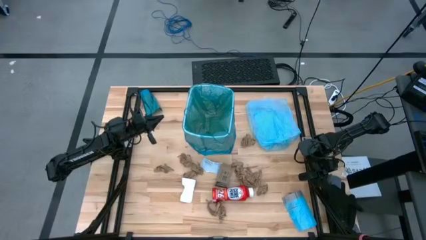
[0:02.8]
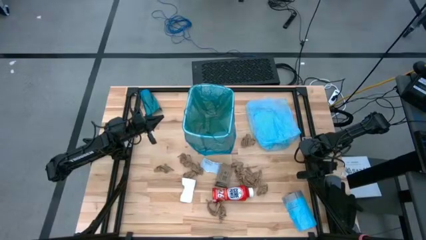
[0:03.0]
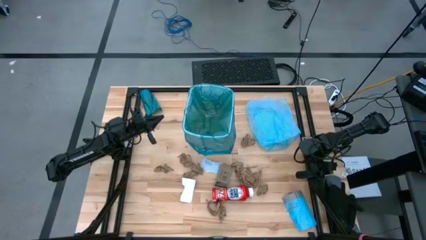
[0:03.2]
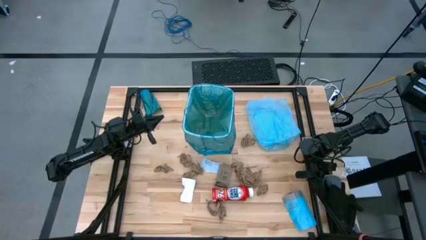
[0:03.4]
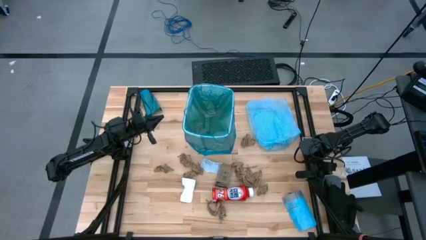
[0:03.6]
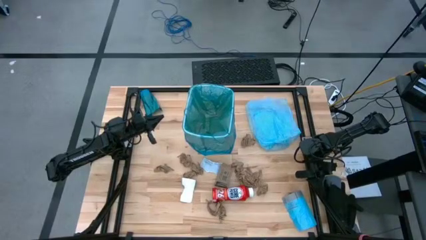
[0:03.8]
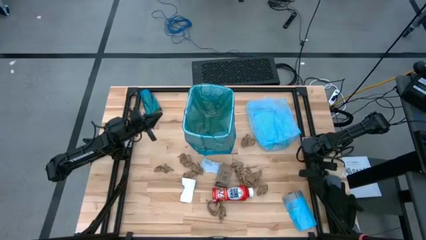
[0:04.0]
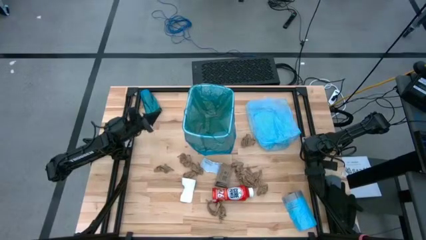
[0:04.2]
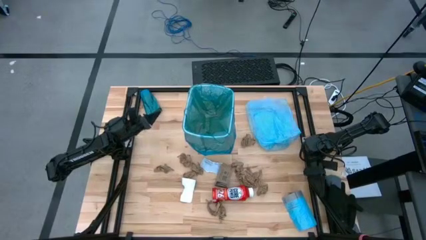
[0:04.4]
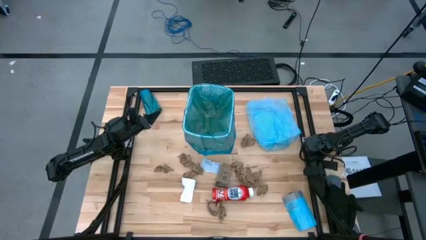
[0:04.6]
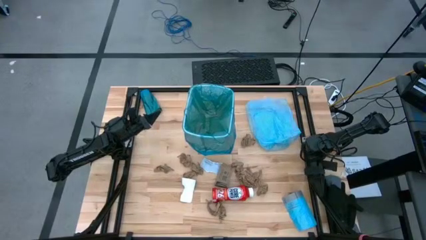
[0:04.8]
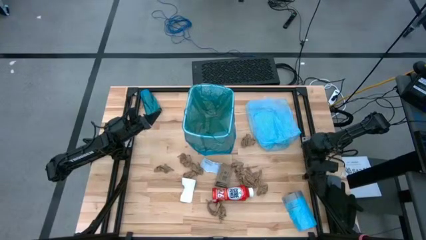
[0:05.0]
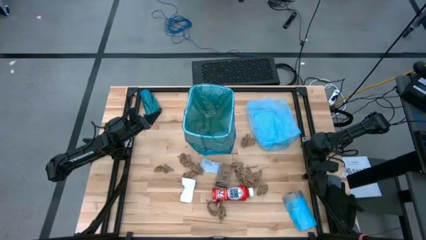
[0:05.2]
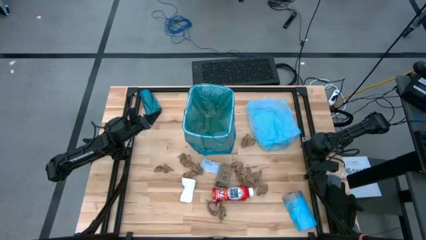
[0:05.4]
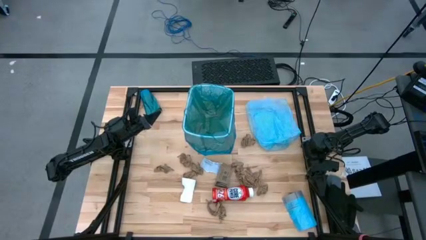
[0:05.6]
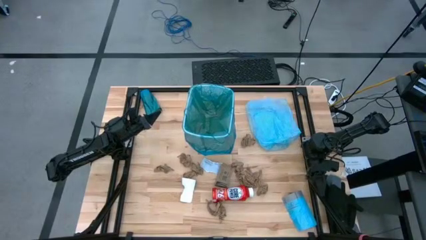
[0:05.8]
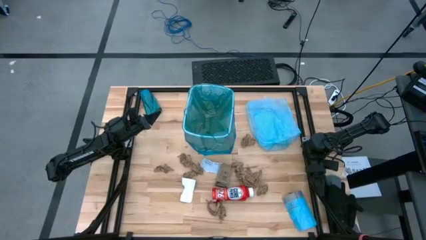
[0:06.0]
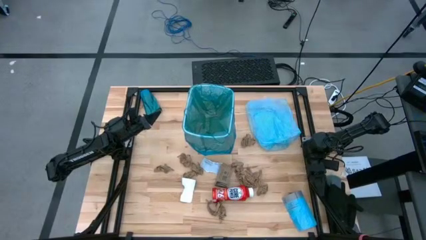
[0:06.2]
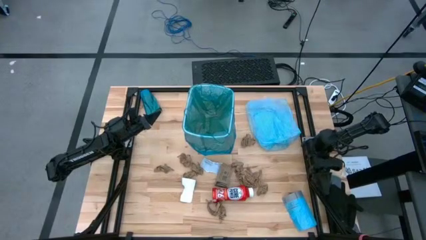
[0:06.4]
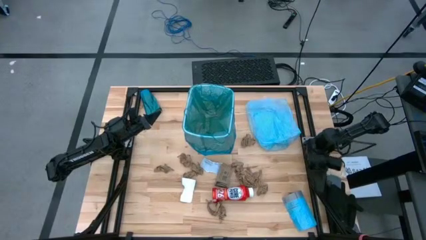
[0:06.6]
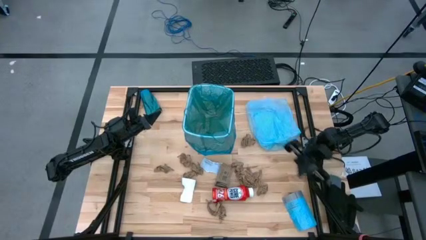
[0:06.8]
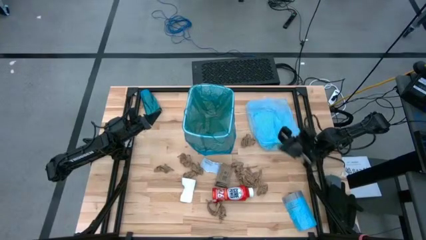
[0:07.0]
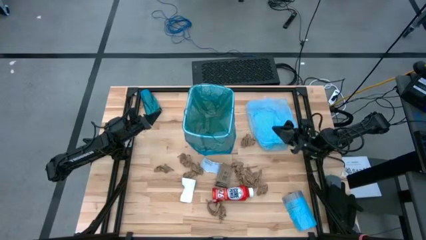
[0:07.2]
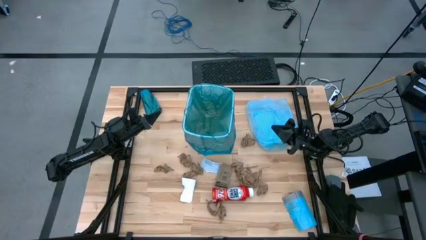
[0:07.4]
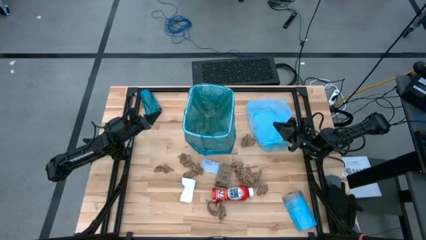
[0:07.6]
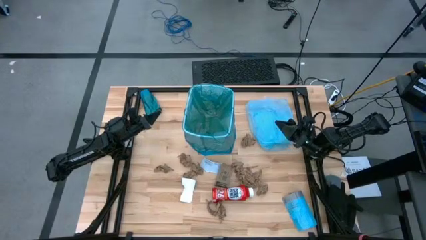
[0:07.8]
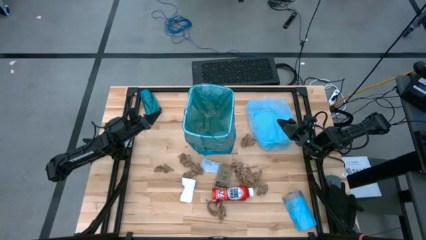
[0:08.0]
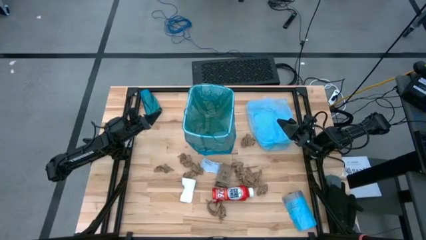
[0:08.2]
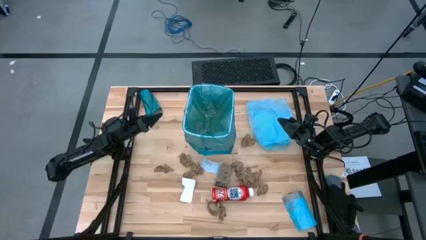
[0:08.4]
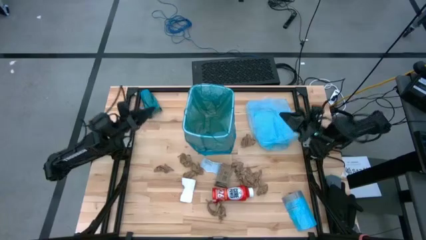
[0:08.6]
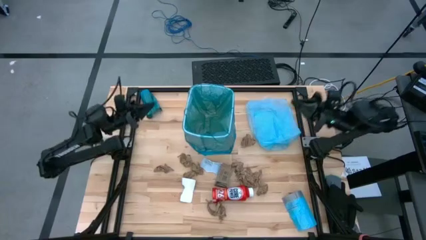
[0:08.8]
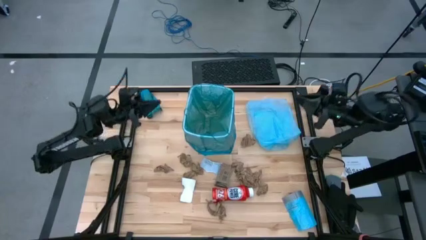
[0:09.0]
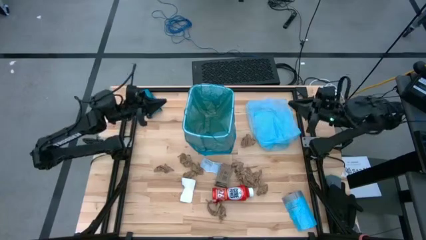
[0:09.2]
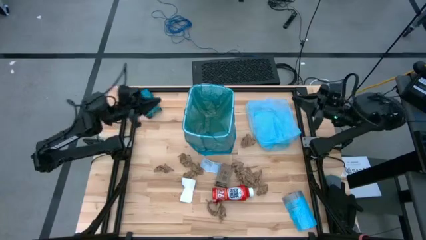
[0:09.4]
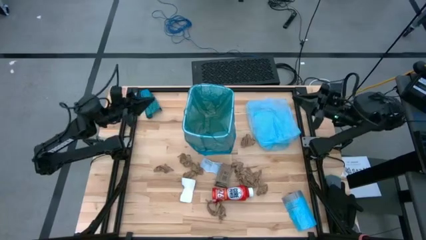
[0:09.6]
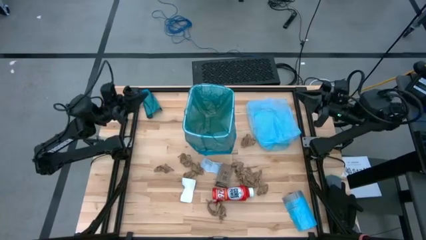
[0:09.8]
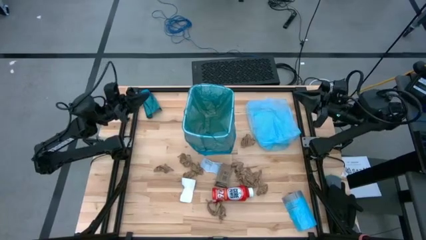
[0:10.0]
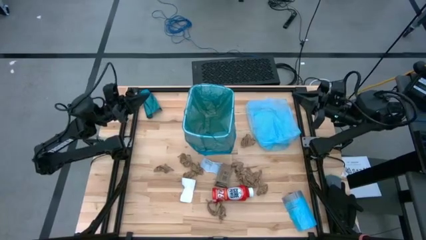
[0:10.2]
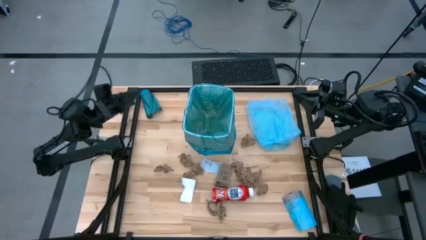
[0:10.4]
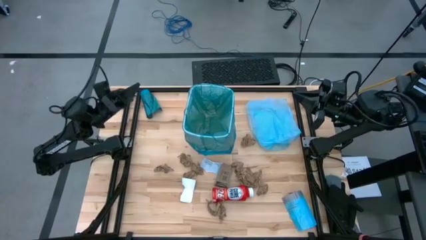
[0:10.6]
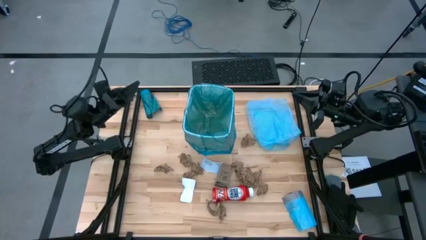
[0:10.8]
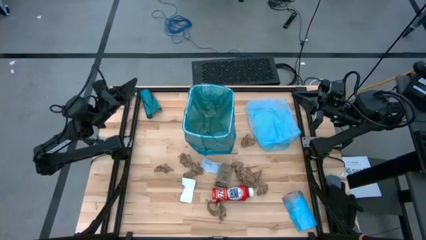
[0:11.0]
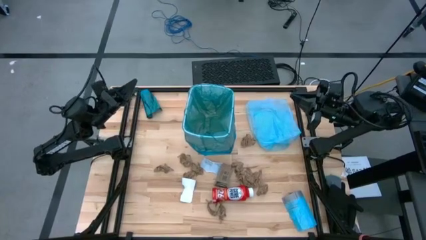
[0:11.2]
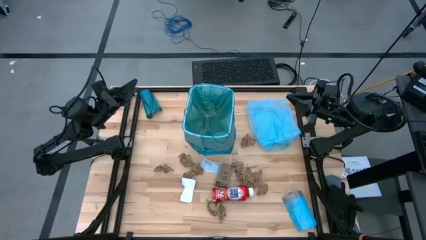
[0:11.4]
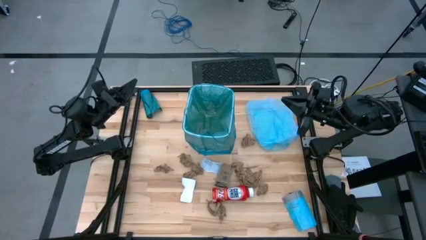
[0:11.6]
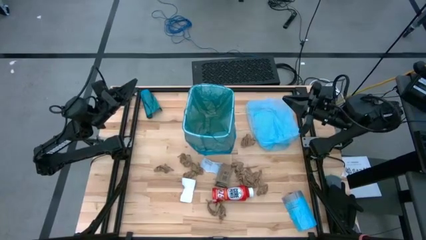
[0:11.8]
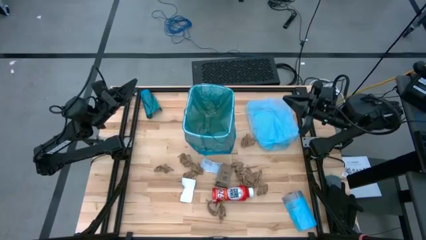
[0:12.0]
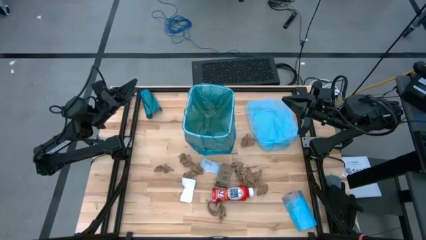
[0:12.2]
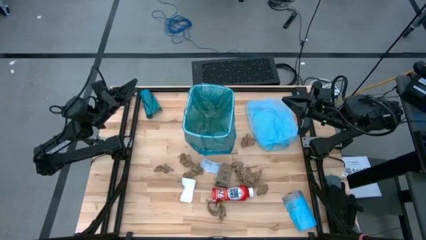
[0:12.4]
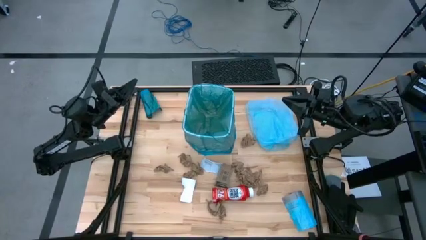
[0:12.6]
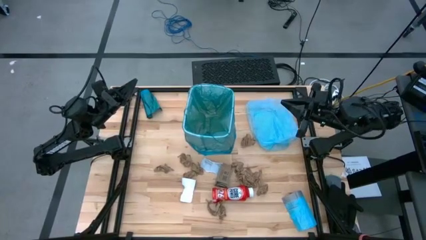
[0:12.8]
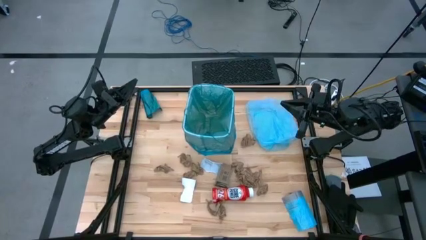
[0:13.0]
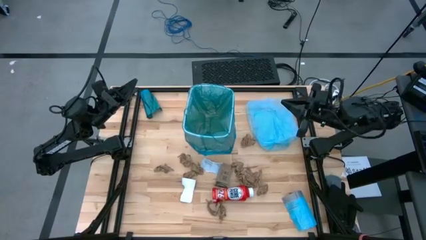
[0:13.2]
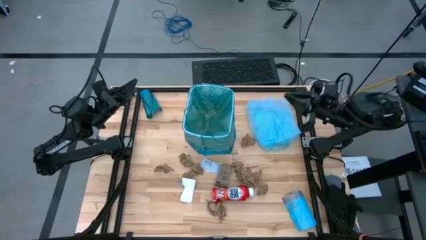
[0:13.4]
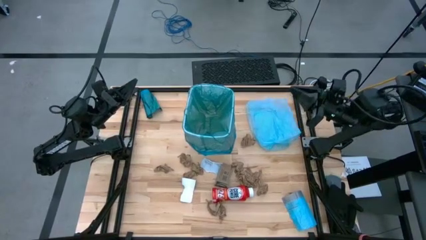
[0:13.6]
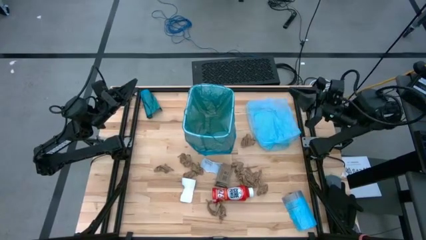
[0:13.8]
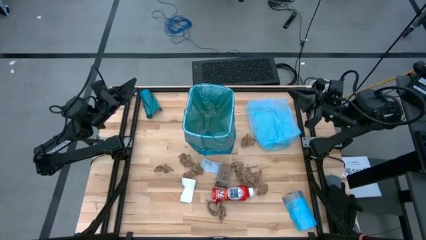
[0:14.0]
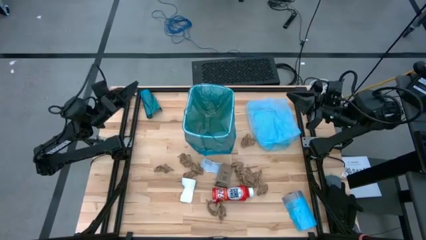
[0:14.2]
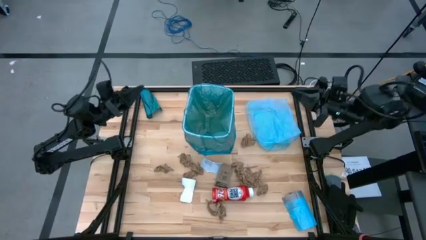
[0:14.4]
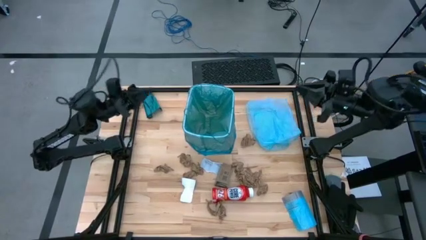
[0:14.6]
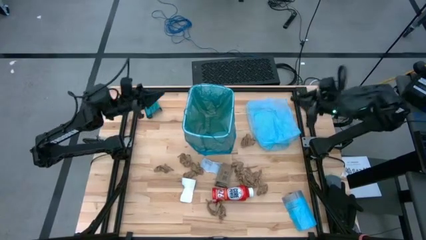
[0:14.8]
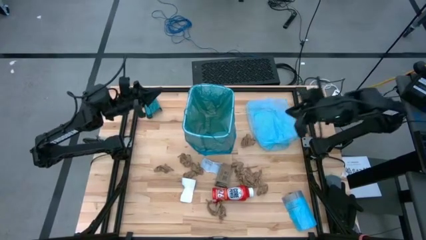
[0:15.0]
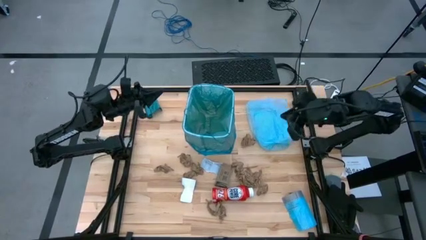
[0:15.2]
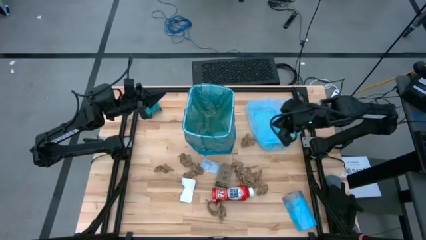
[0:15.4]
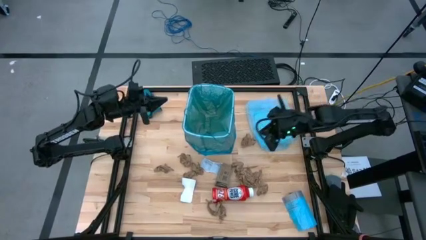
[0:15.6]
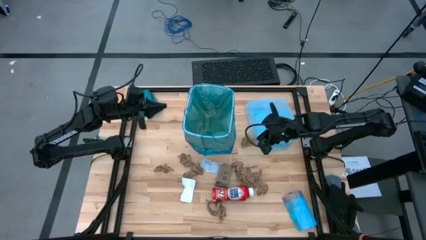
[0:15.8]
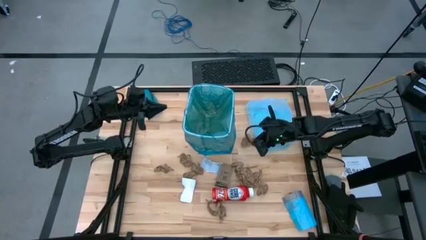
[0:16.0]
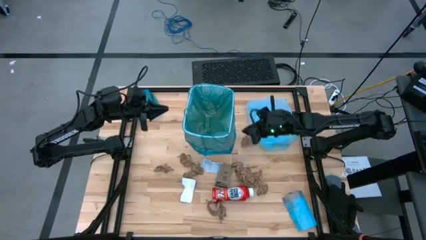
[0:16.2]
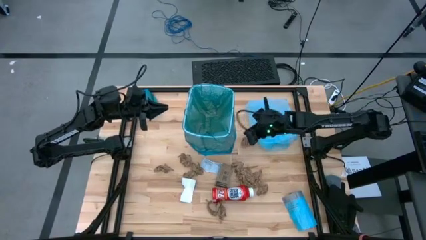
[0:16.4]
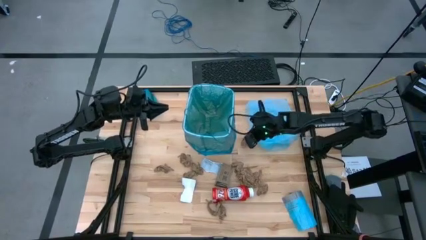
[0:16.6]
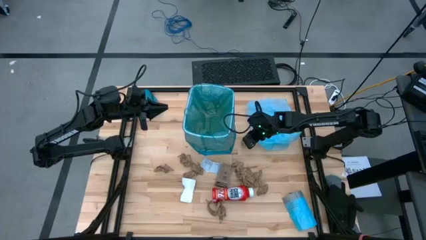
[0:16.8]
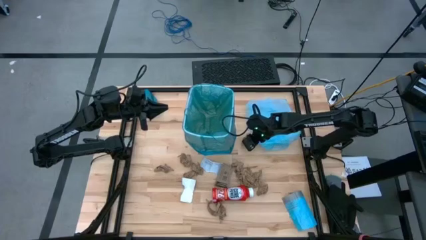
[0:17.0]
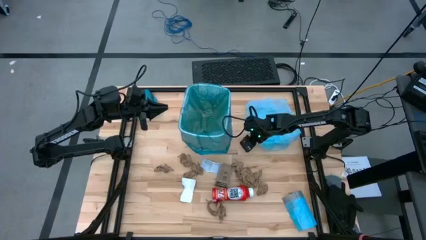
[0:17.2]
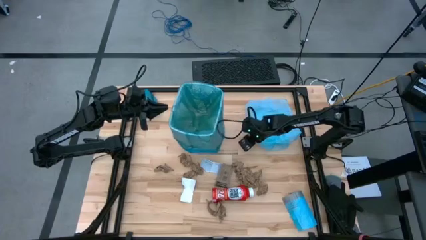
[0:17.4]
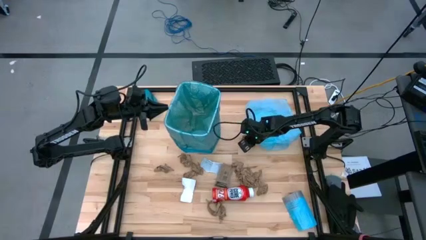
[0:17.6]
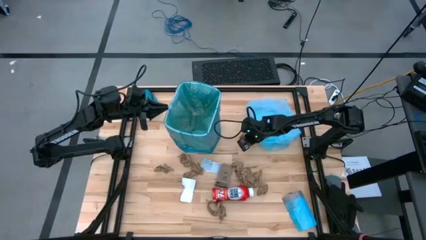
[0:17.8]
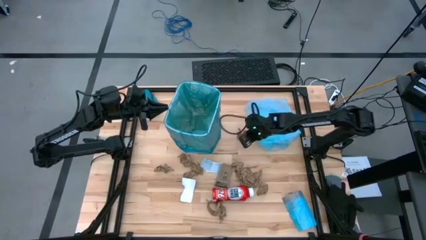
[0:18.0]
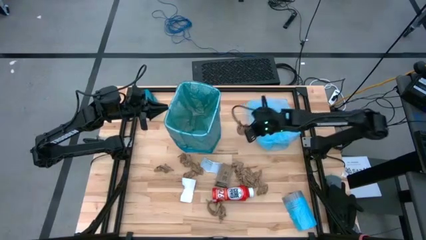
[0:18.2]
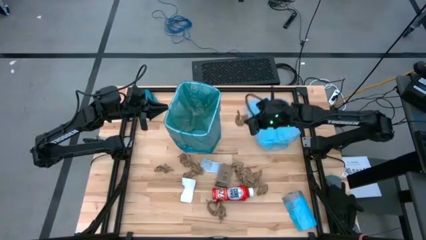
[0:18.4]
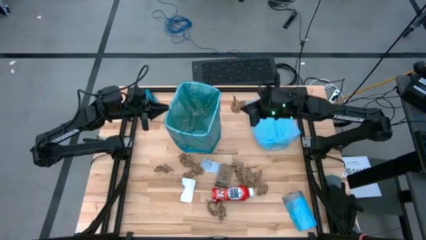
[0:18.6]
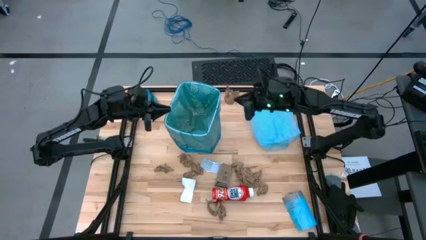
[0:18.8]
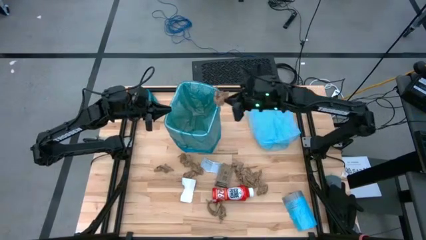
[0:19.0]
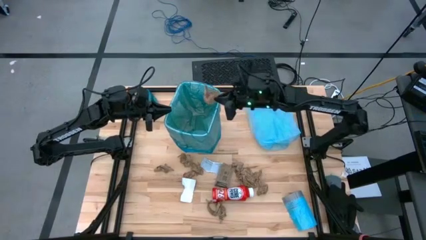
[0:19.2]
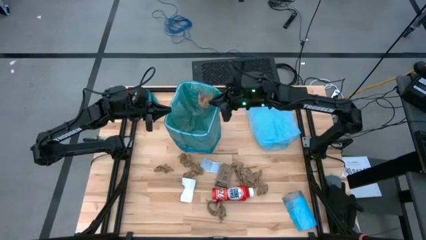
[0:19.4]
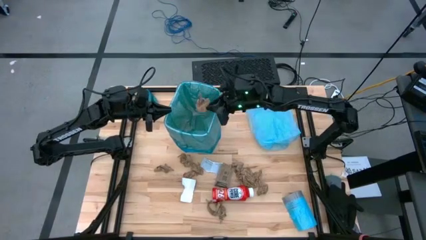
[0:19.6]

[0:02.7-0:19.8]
Task: place trash/remove bag and relplace
Put the brown paper into the blue trash bag inside the white trash bin
